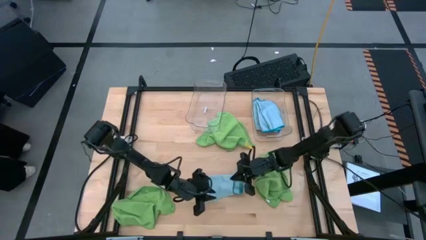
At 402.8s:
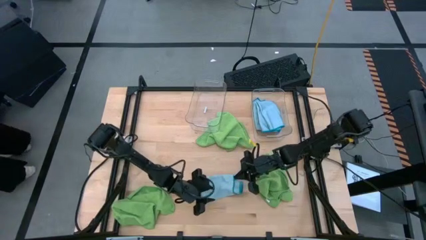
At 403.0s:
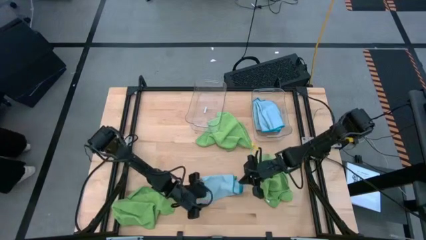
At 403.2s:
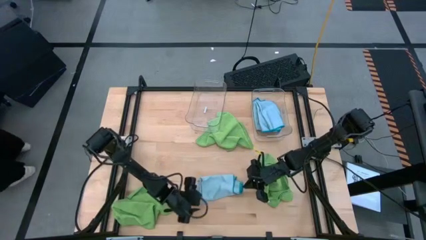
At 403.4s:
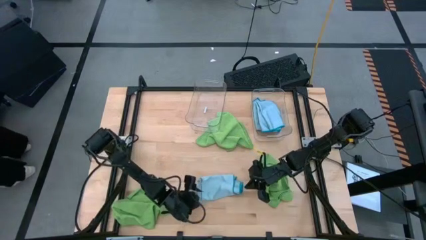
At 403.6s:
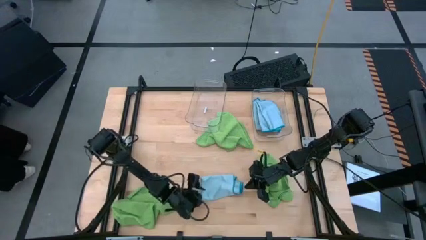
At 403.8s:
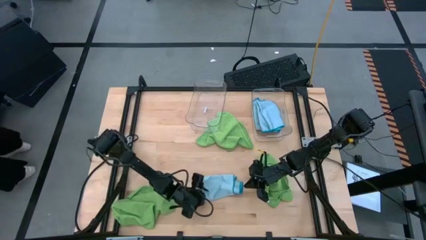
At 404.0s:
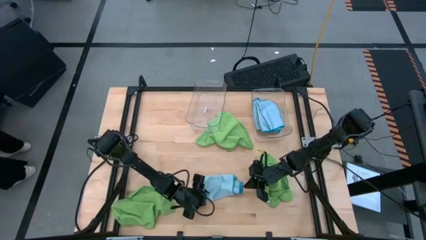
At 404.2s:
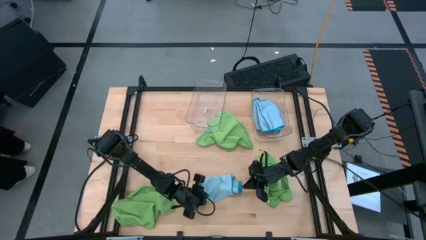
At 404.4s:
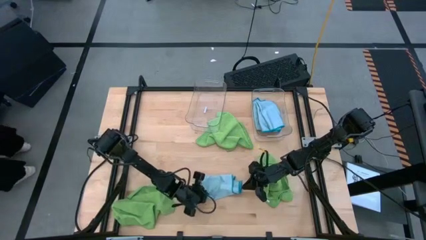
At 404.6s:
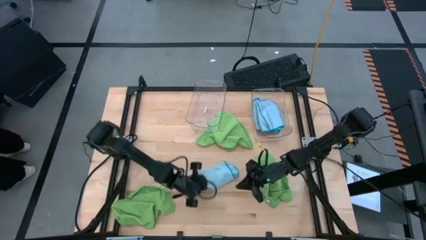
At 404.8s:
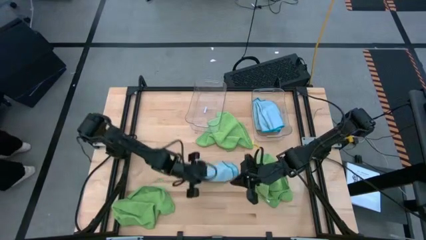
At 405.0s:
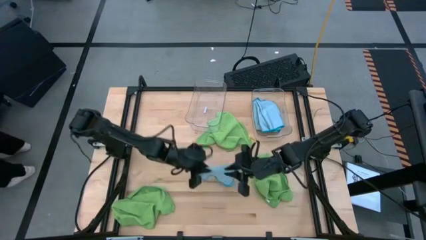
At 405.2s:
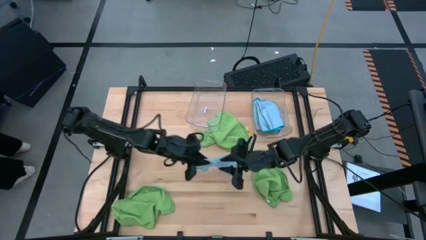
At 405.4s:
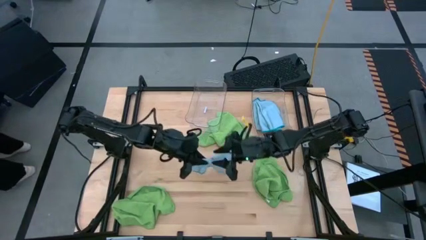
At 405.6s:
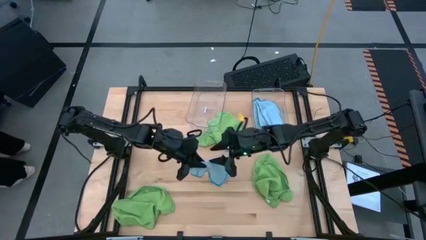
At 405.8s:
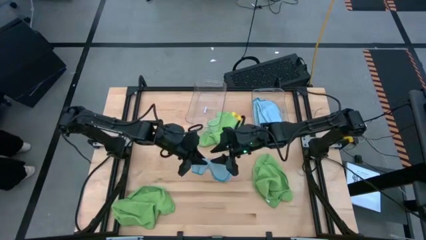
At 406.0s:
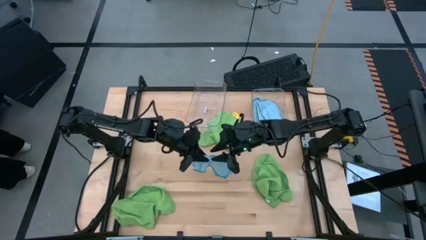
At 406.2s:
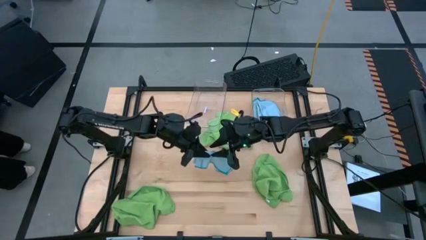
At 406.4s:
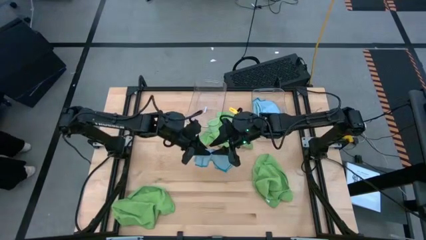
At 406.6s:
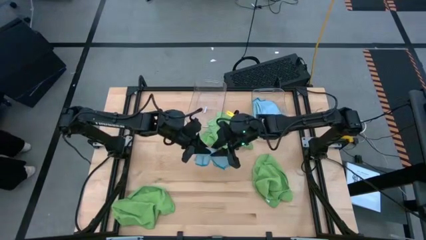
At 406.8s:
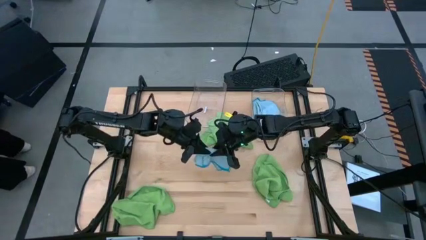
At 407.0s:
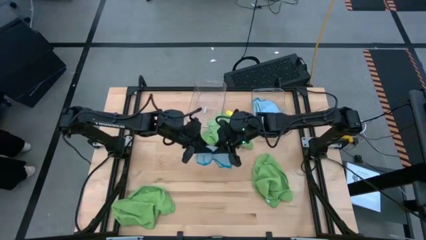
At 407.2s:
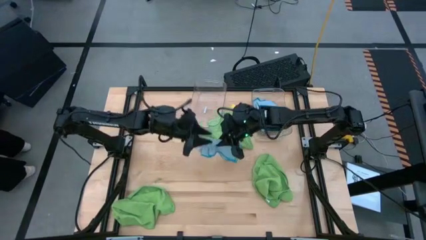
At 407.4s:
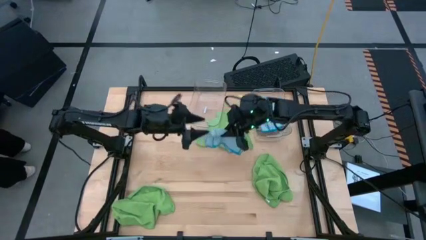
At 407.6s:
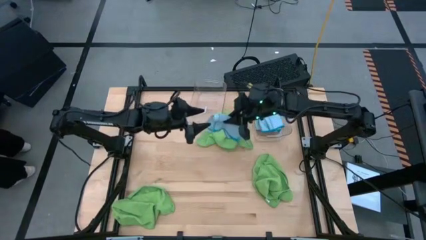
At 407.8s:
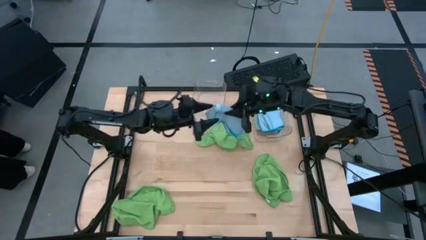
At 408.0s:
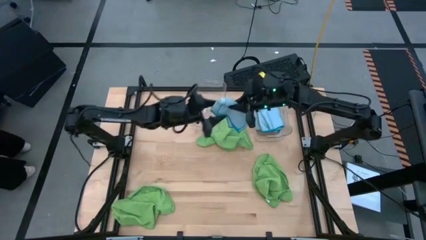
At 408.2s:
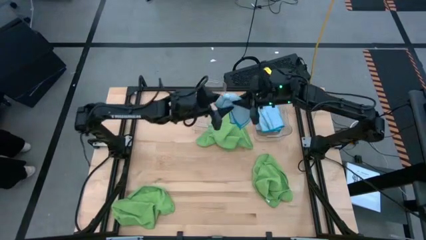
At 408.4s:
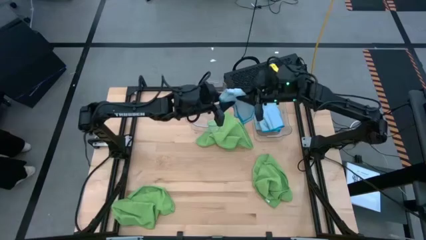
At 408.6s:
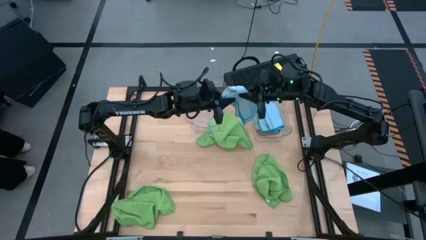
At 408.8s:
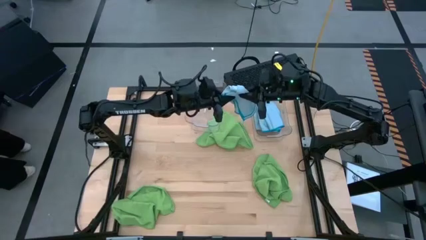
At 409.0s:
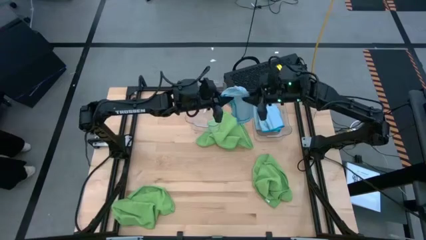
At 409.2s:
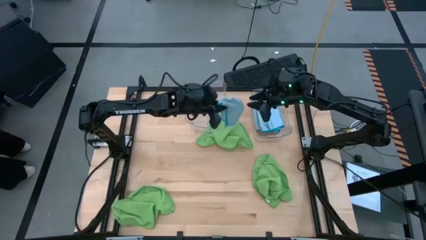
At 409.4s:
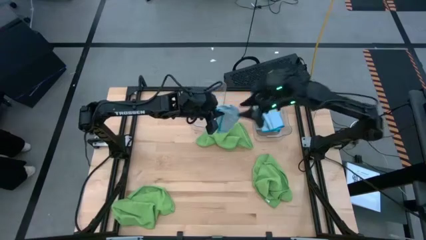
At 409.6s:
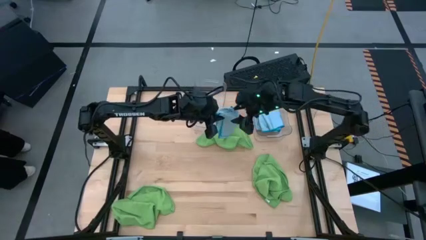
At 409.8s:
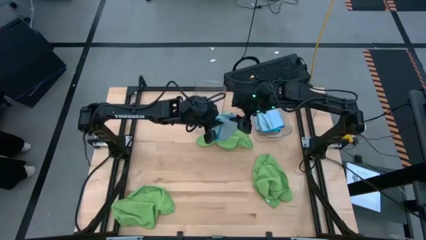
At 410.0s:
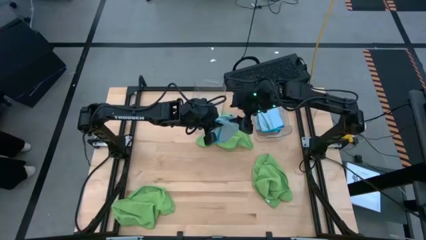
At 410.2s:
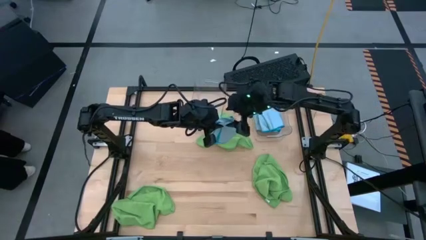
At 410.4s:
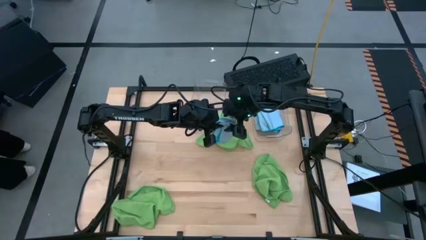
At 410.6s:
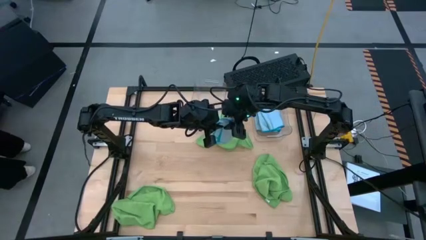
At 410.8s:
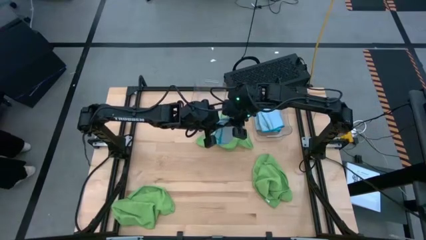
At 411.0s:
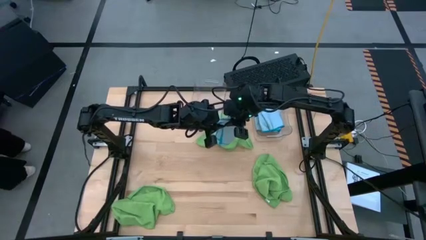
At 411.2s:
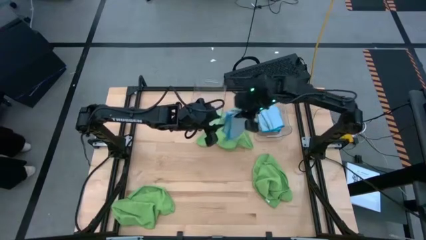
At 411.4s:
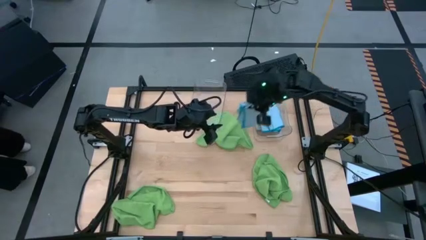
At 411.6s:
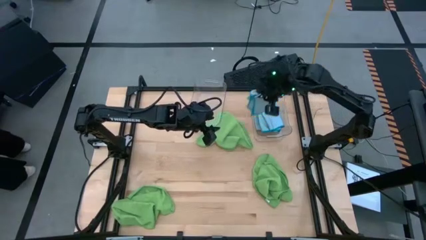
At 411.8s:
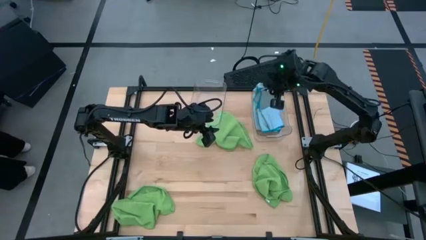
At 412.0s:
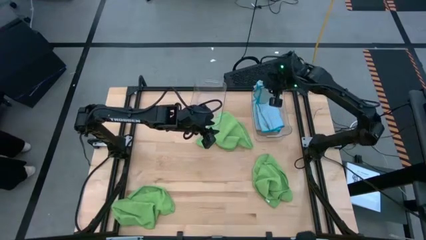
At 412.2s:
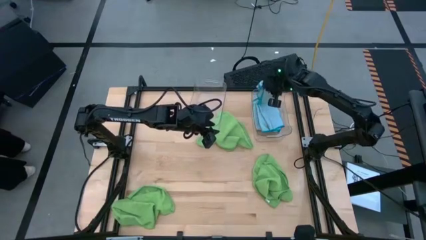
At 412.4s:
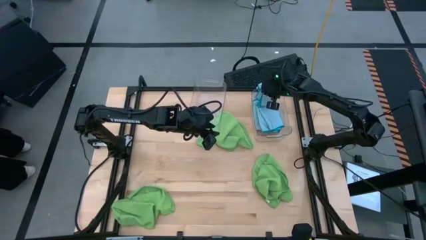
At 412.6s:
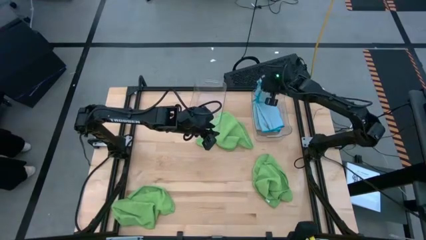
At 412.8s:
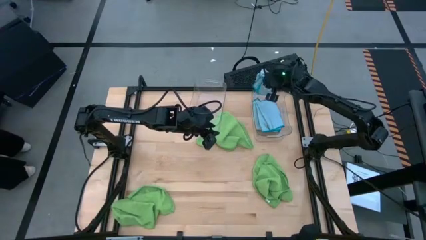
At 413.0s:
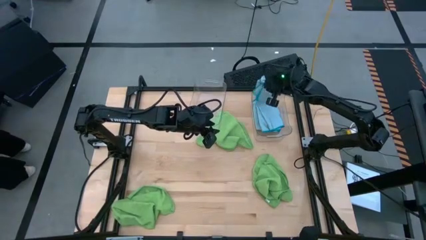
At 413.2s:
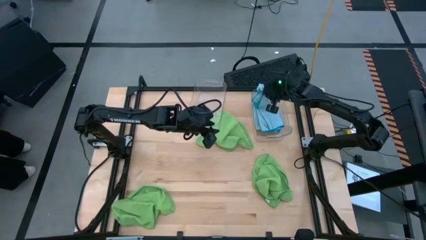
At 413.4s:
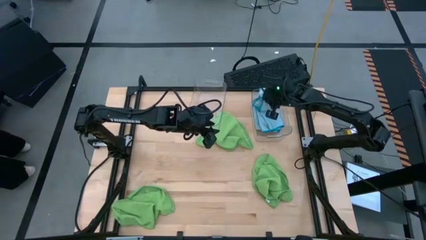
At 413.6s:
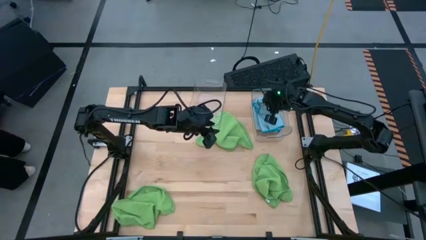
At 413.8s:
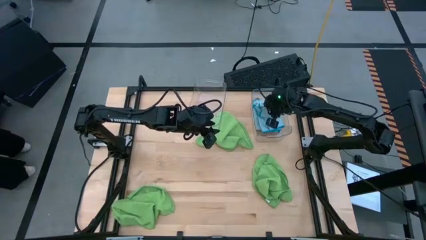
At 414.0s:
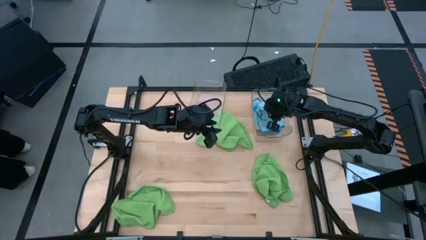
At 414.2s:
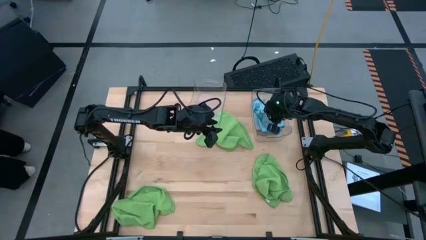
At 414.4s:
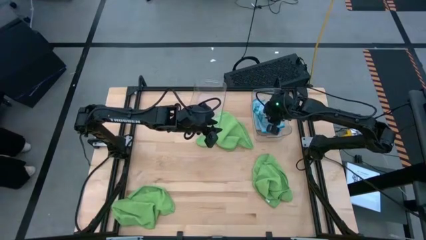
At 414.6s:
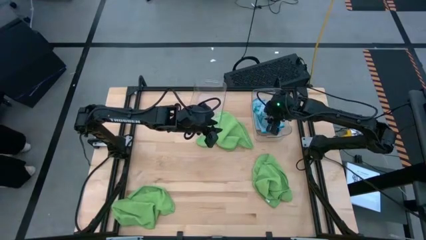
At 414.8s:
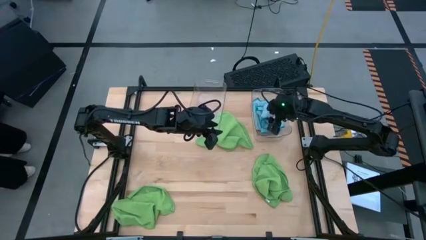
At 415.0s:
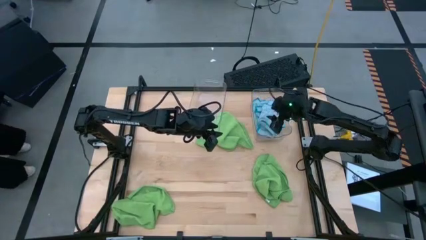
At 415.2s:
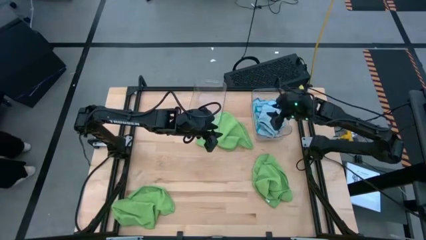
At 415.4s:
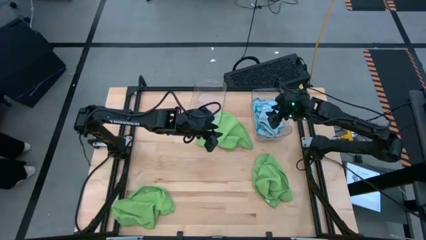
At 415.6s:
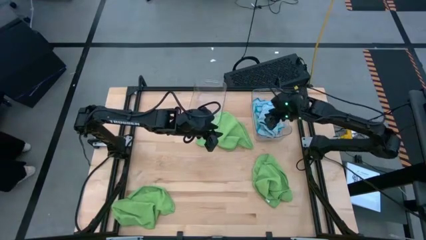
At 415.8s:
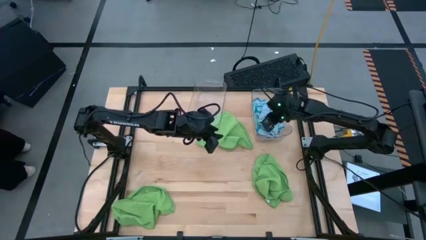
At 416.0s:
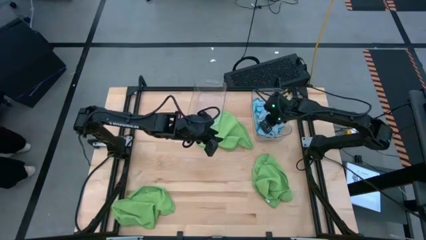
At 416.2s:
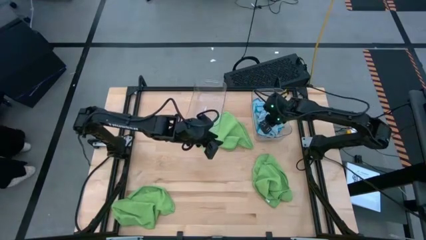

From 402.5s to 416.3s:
Task: Fold microfiber towels
Put the blue microfiber towel into the right transparent bin

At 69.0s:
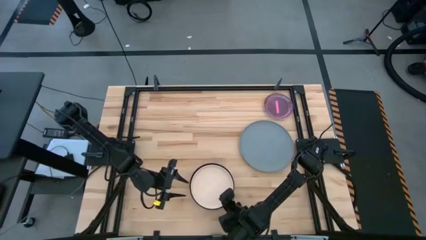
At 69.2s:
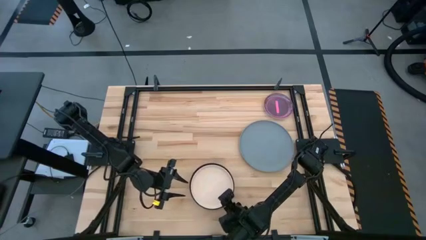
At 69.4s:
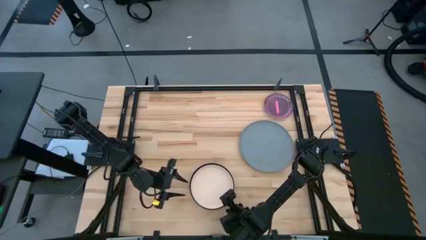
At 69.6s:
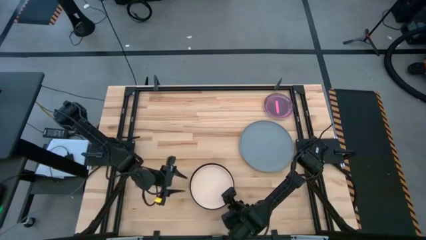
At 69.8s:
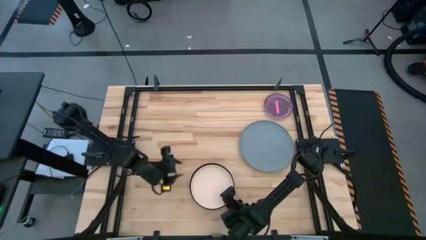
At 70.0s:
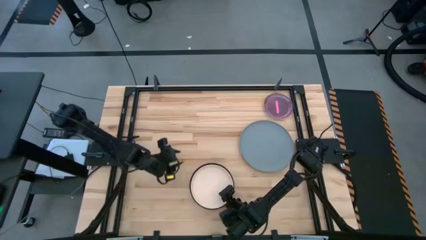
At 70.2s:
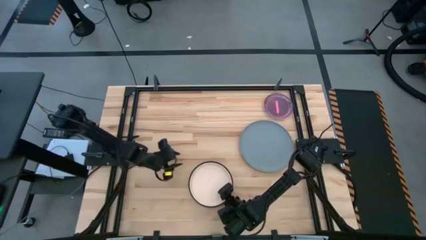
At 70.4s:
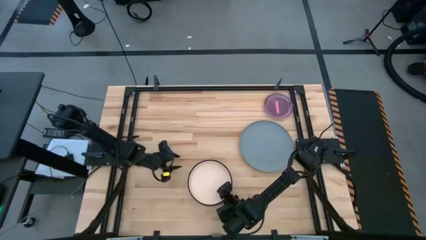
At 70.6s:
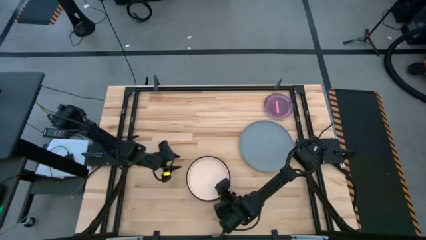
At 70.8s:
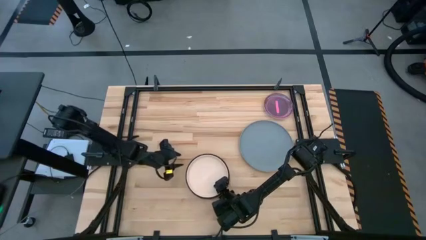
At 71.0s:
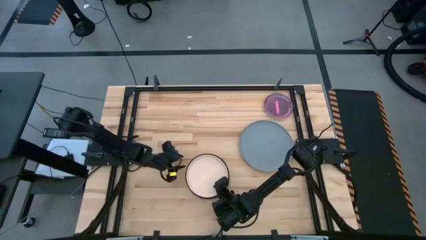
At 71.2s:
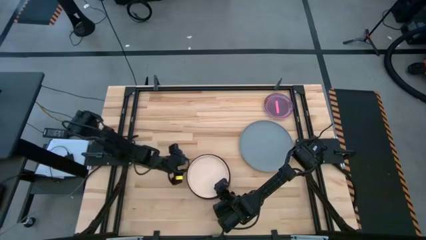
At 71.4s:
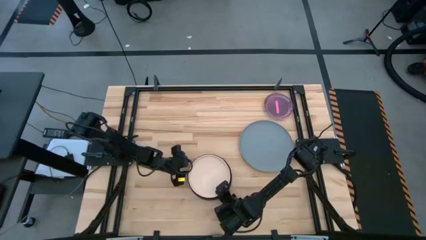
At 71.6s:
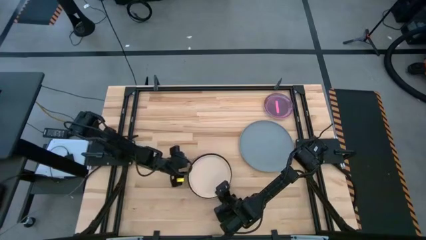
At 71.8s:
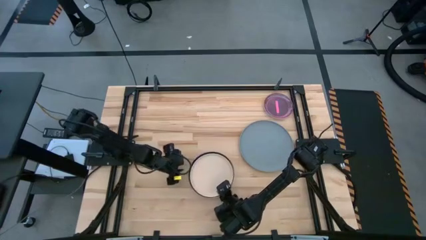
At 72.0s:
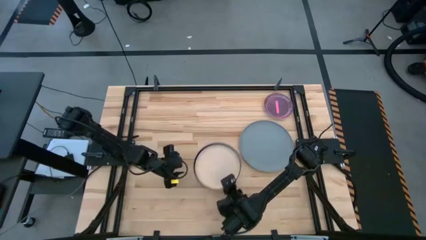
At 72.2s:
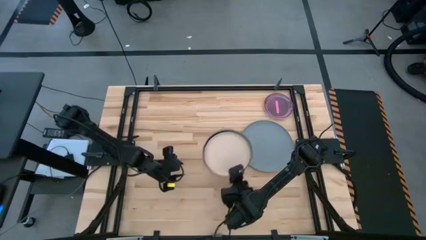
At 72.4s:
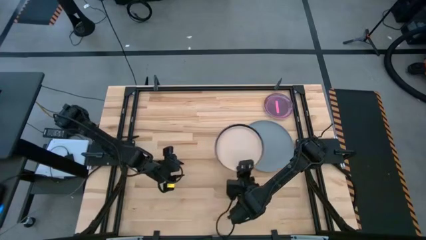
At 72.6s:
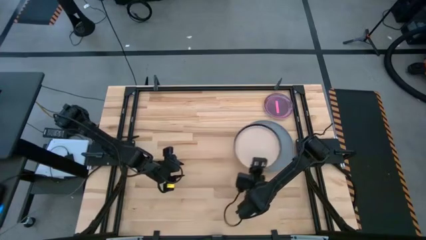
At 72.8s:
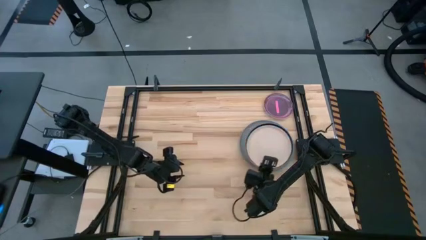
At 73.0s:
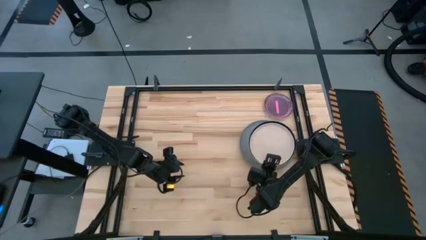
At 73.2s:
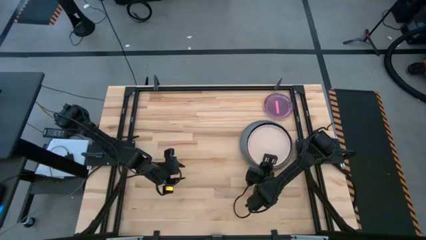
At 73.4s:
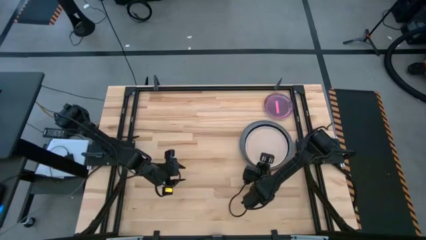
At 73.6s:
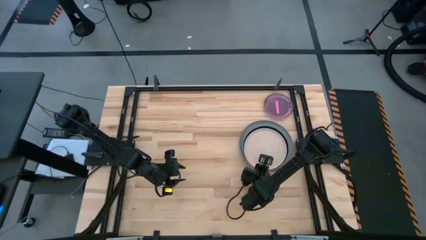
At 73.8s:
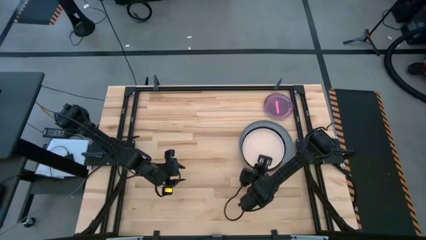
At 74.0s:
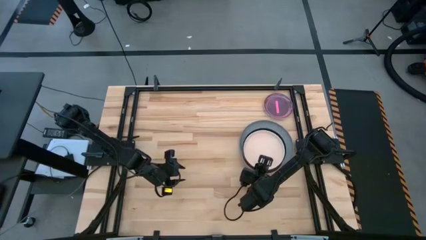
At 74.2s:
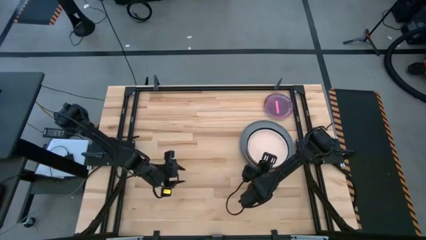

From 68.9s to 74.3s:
Task: Stack plastic plates
Stack the left stacked plates on top of the gray plate
